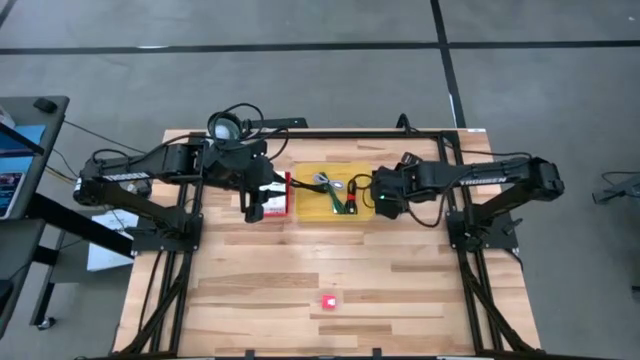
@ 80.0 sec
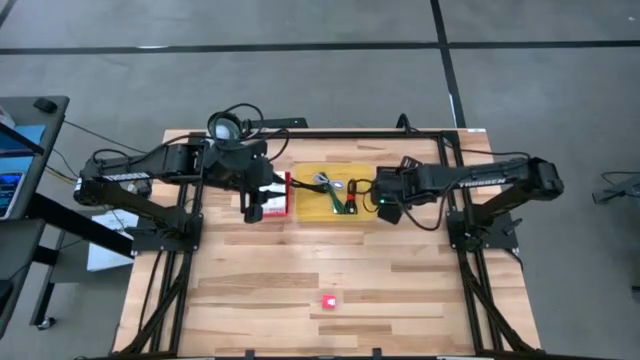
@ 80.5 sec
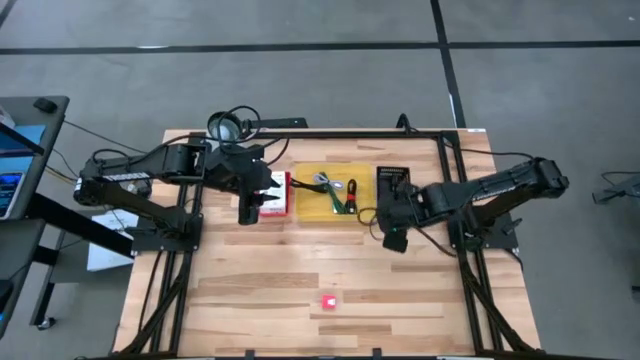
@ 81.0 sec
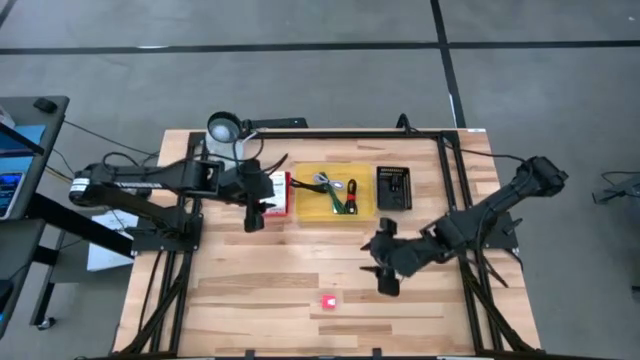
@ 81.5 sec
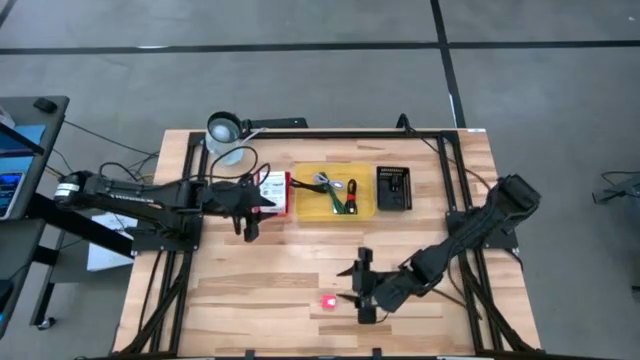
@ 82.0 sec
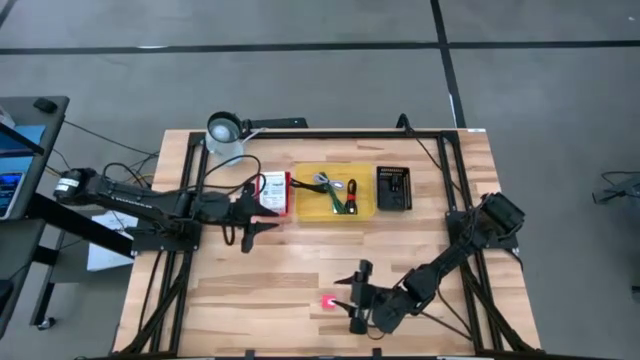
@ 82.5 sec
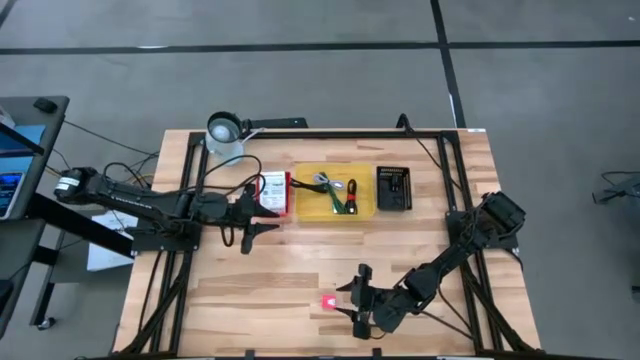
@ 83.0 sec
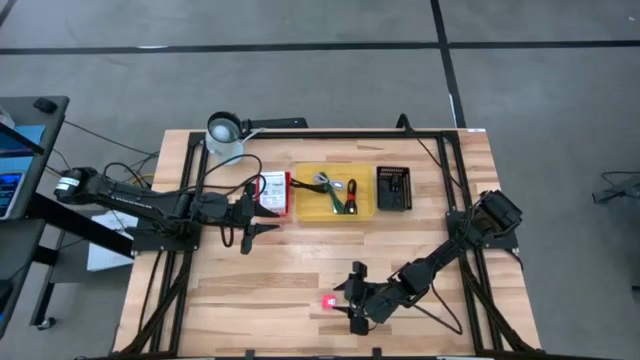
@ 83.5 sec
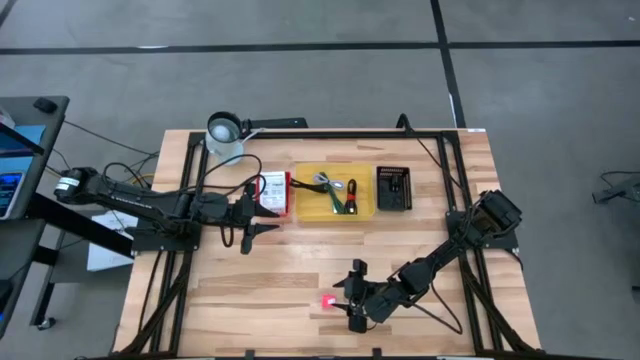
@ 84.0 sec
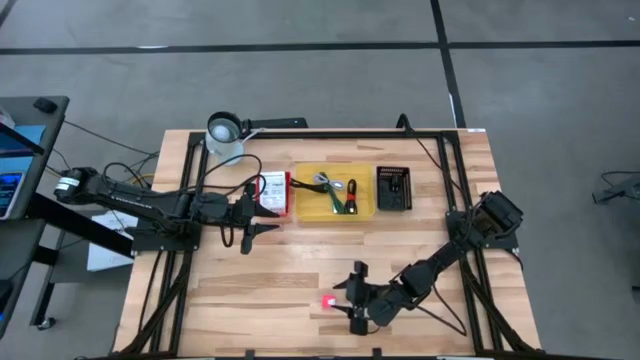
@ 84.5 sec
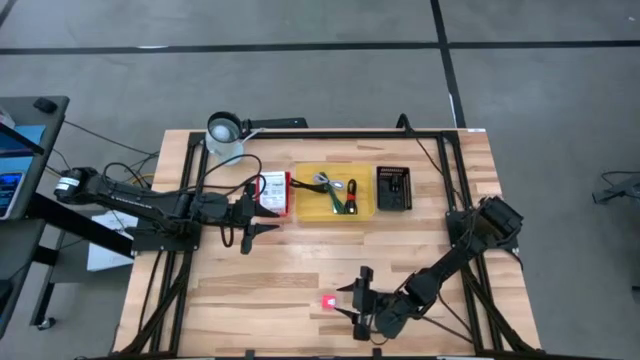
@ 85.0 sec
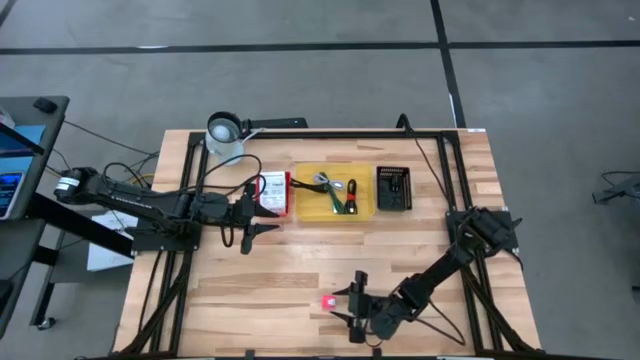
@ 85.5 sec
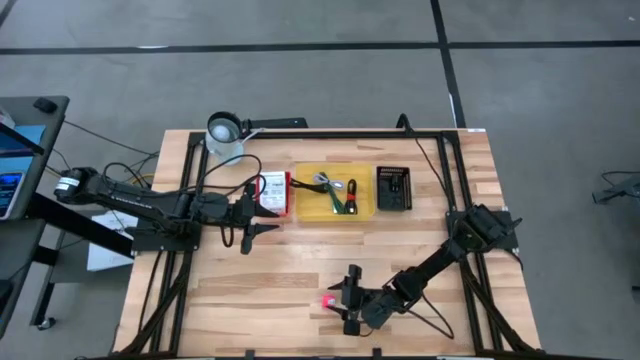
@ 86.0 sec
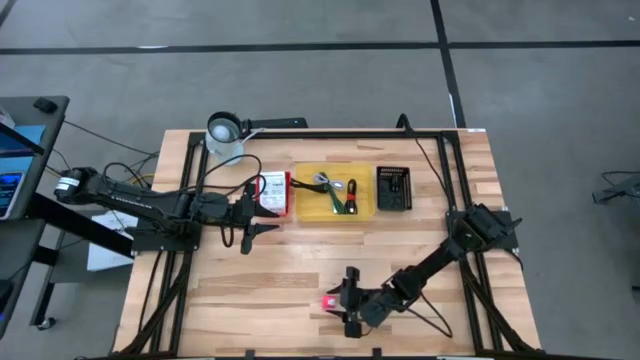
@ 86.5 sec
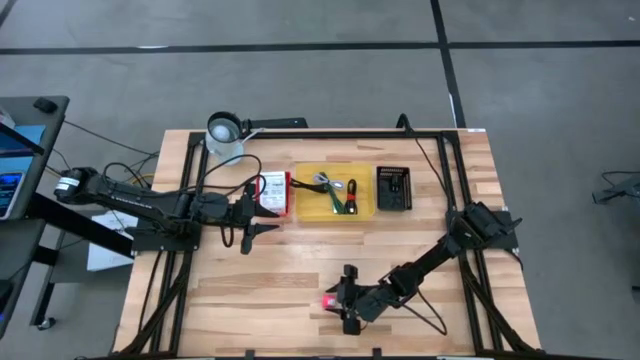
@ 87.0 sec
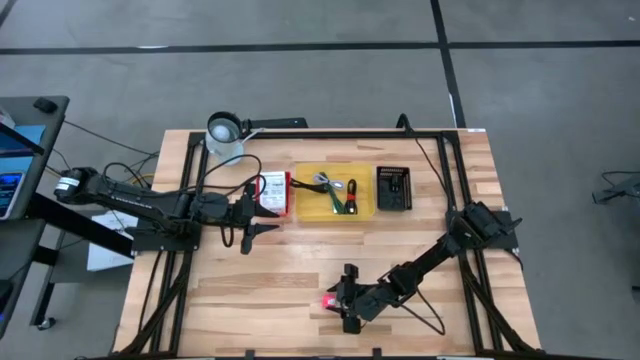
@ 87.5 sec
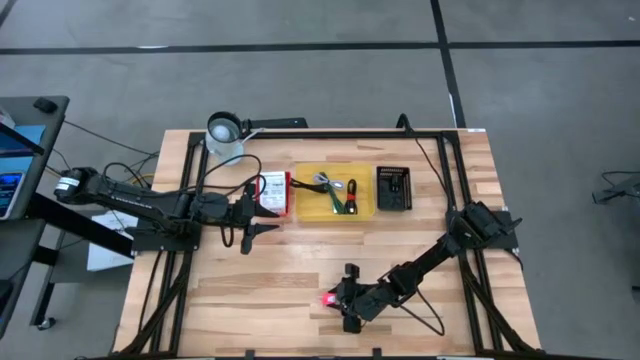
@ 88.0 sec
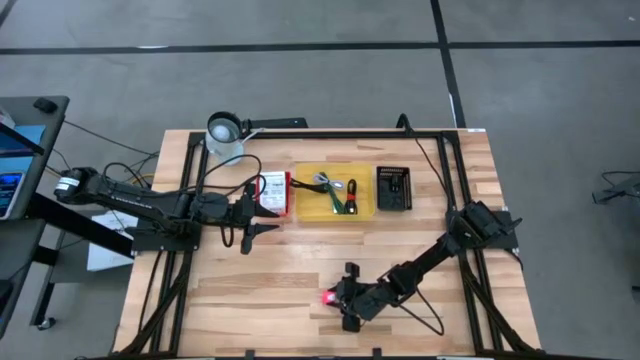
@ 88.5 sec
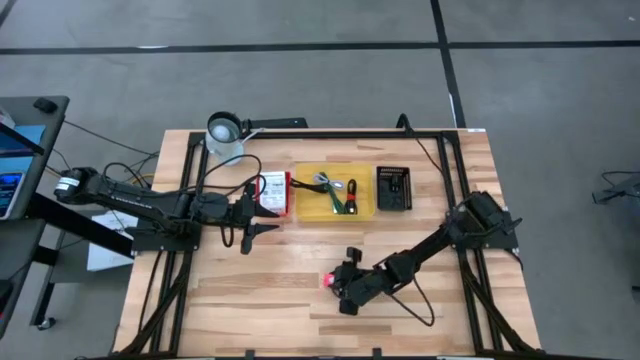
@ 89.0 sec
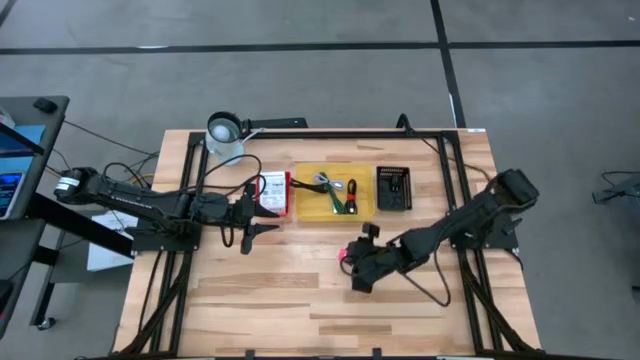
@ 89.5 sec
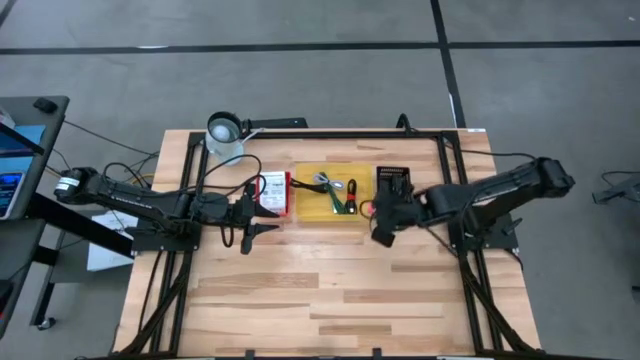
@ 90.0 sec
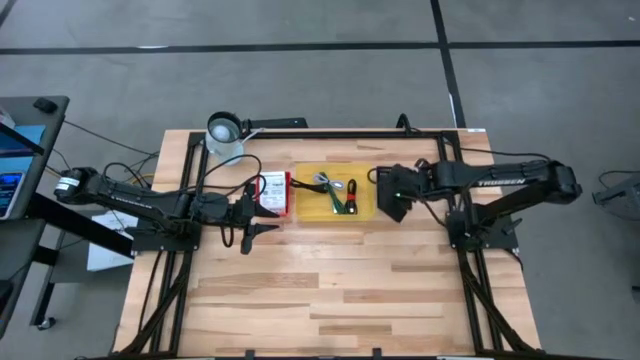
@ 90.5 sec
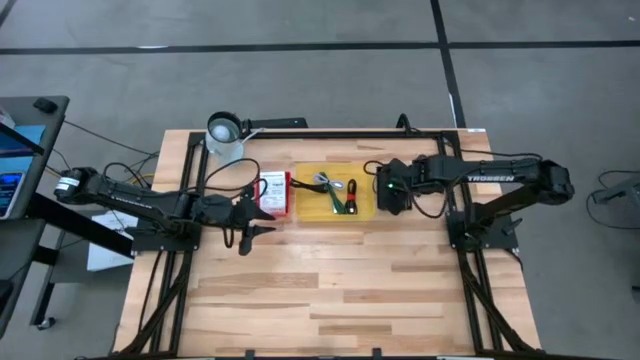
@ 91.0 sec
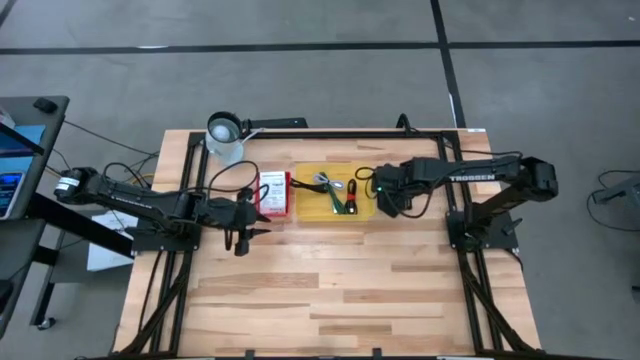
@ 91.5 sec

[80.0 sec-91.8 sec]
Task: Pick and place items into bin
Put the pink charger adapter into the black bin

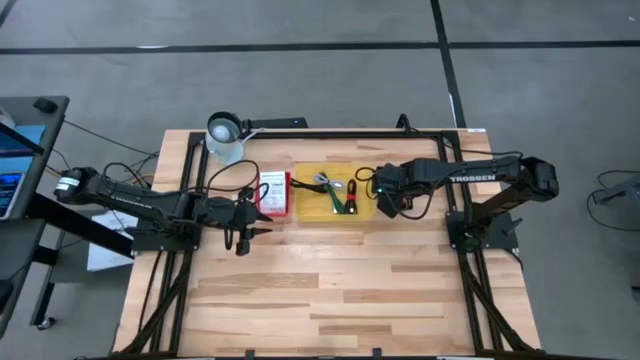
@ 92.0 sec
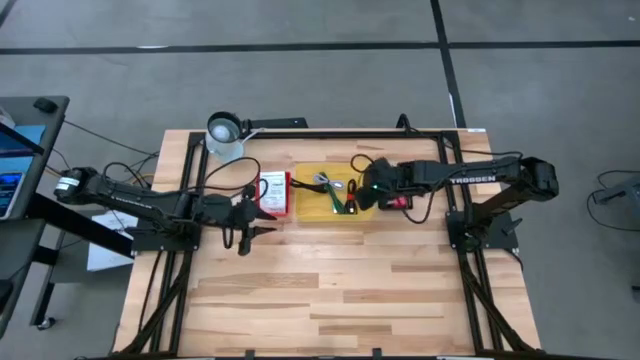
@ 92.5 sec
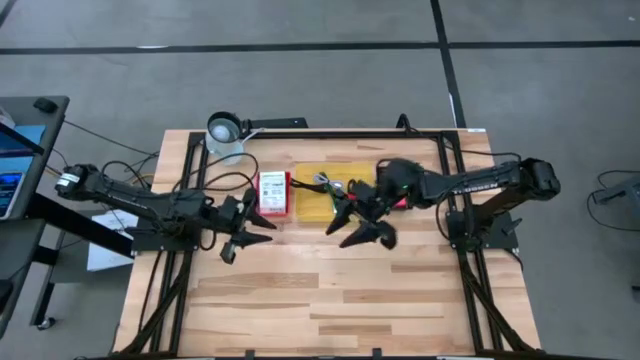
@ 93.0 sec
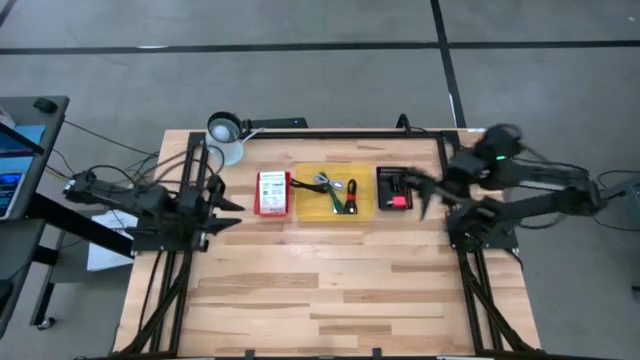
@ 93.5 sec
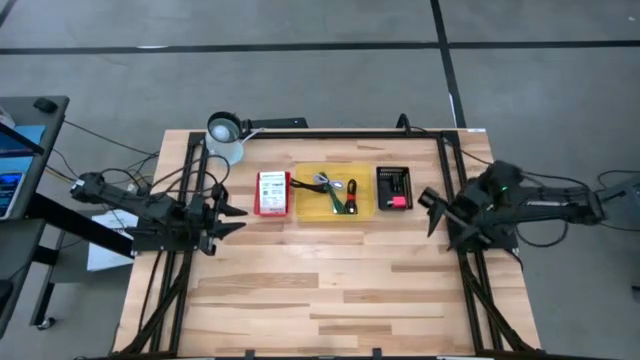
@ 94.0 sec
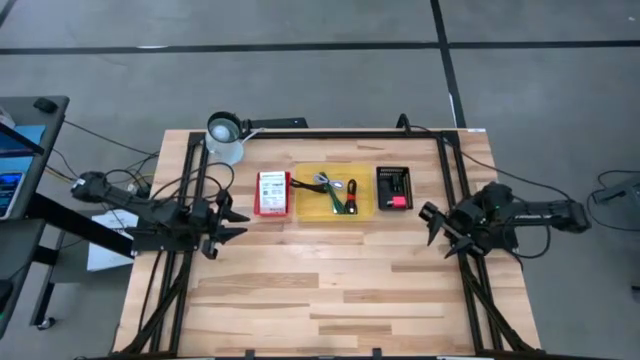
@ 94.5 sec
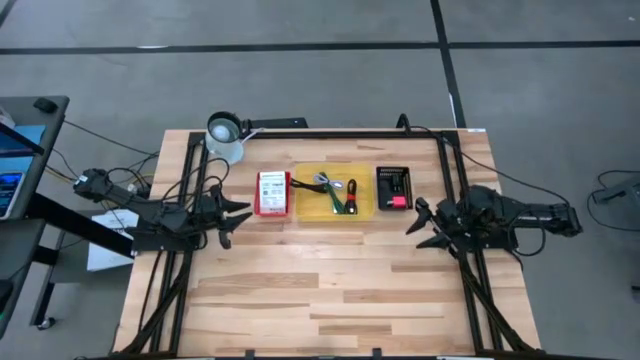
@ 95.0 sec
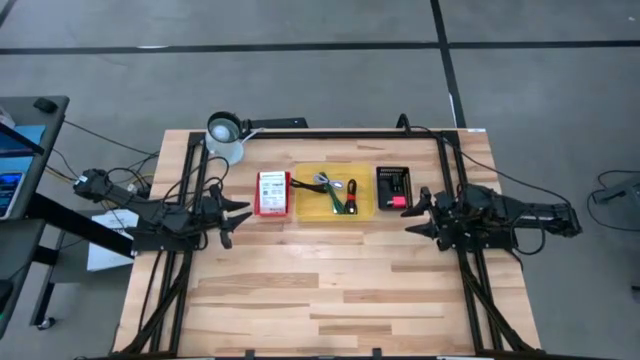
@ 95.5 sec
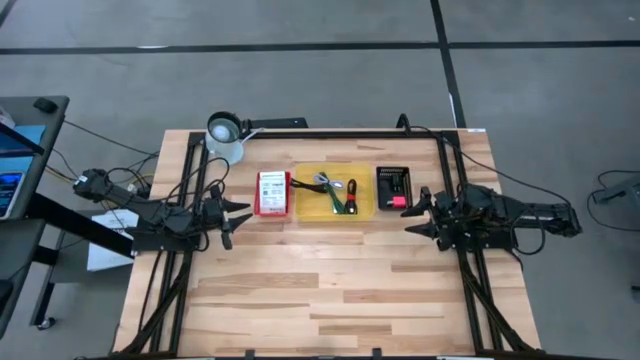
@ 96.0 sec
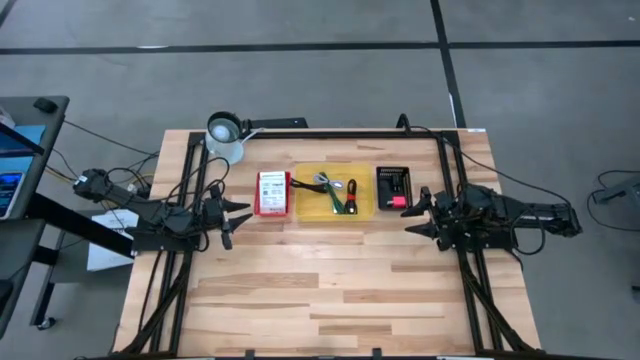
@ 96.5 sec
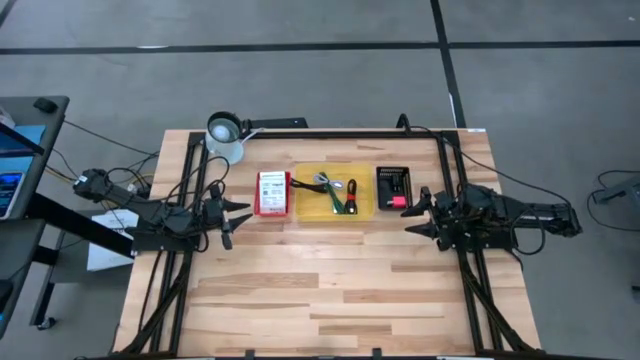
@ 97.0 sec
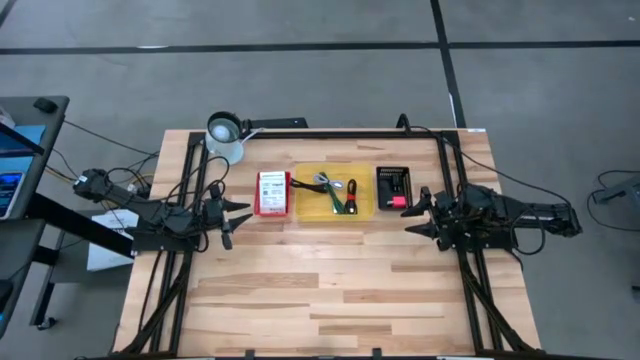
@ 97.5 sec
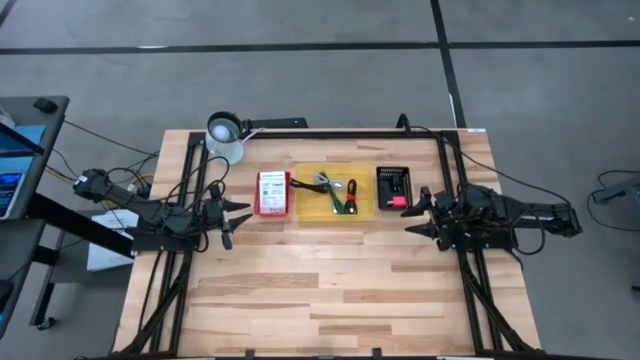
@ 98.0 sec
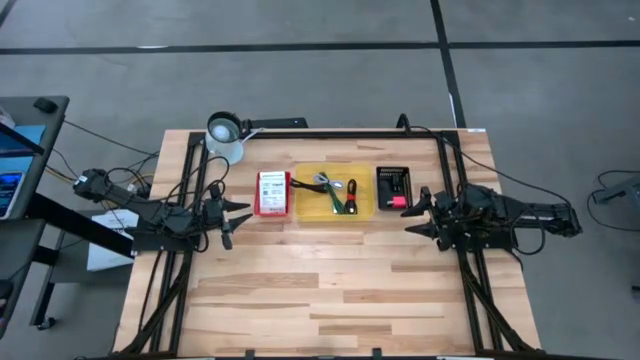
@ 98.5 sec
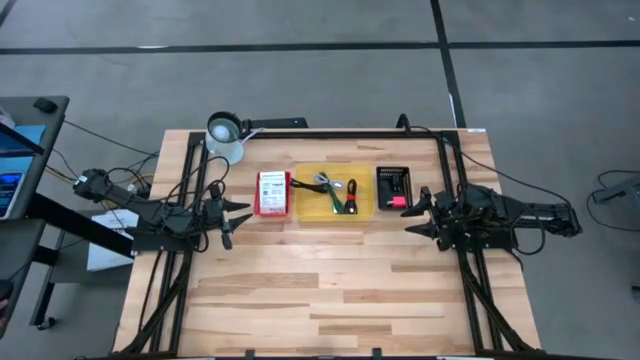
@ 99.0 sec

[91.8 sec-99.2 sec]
Return to Home Position
